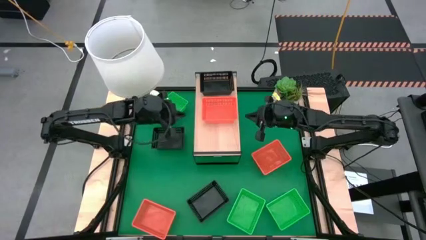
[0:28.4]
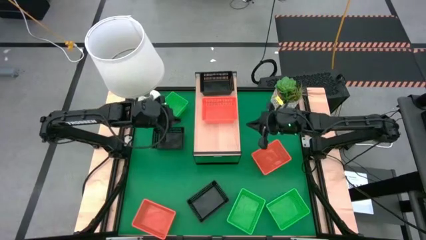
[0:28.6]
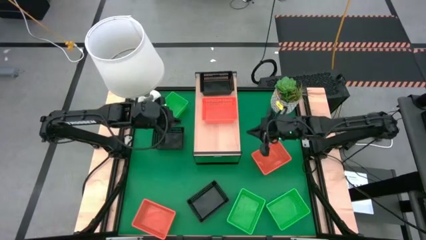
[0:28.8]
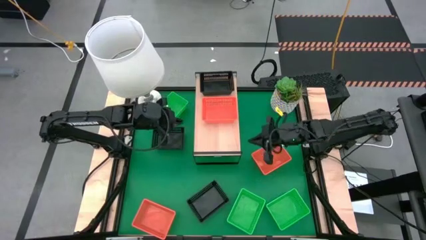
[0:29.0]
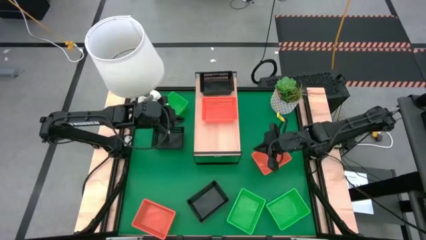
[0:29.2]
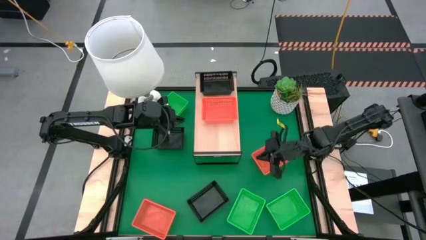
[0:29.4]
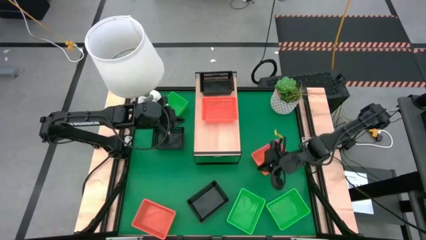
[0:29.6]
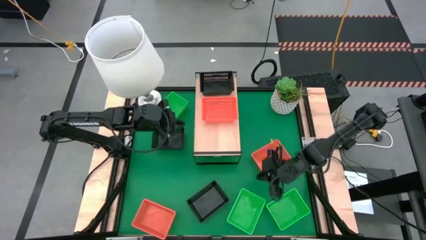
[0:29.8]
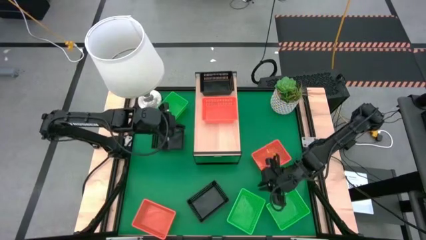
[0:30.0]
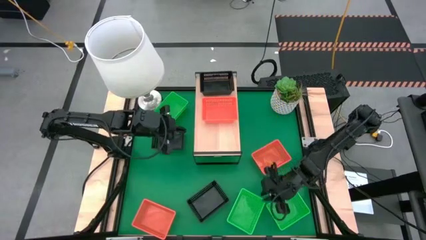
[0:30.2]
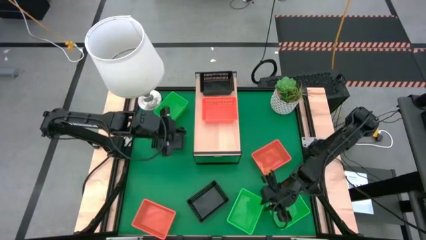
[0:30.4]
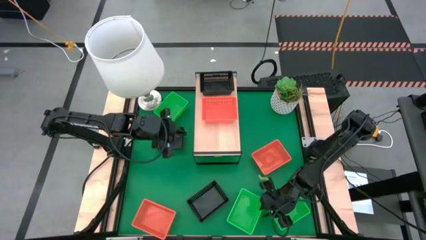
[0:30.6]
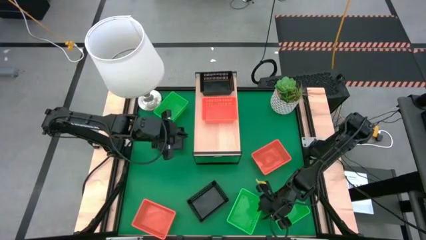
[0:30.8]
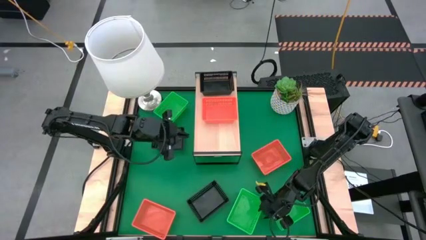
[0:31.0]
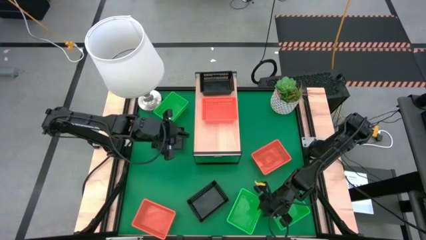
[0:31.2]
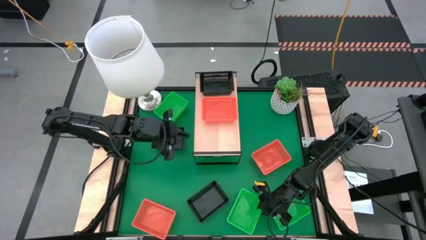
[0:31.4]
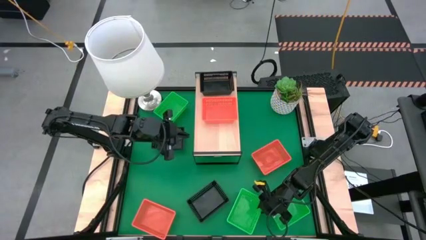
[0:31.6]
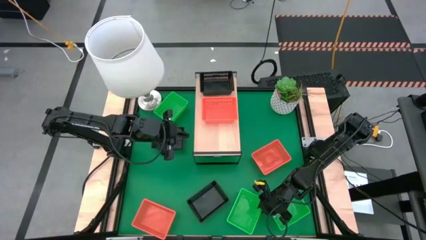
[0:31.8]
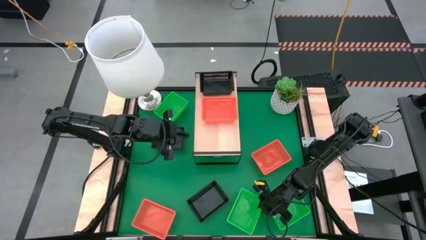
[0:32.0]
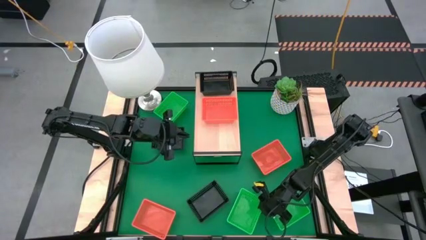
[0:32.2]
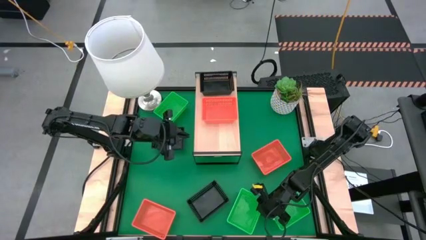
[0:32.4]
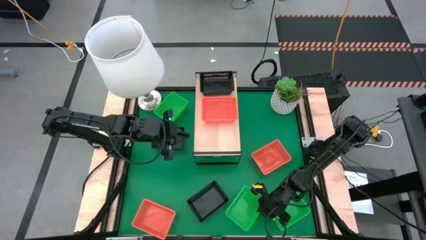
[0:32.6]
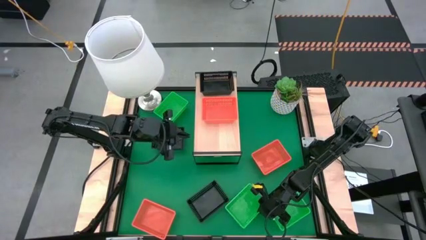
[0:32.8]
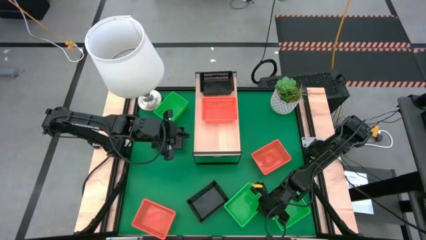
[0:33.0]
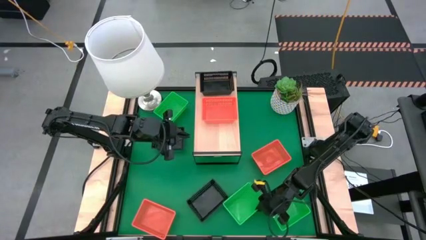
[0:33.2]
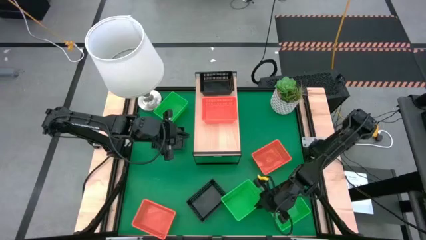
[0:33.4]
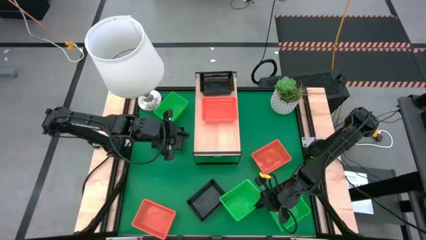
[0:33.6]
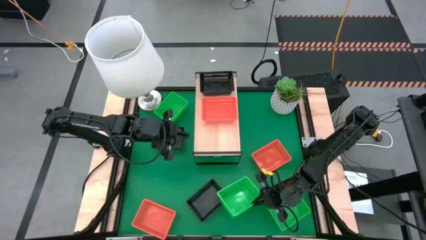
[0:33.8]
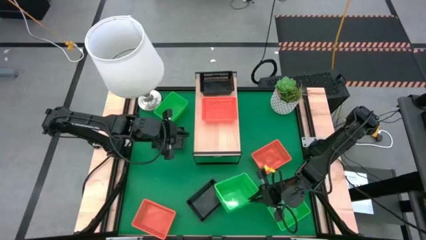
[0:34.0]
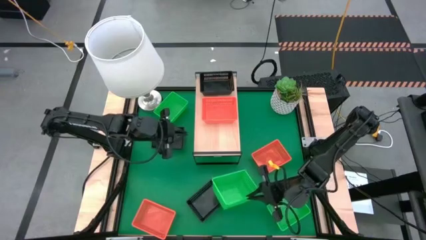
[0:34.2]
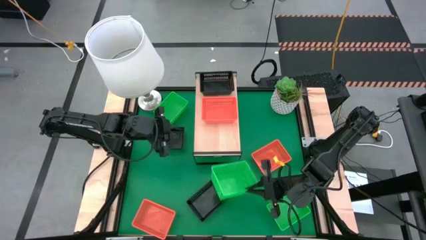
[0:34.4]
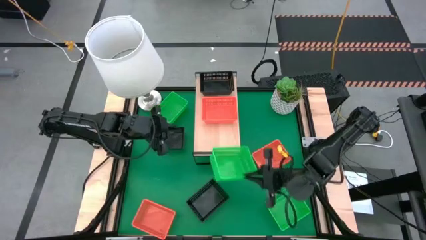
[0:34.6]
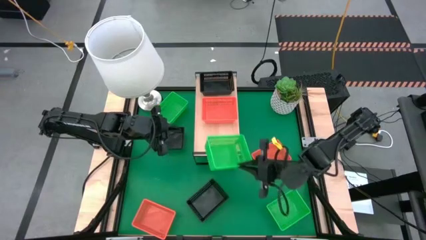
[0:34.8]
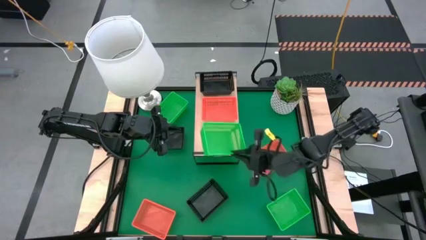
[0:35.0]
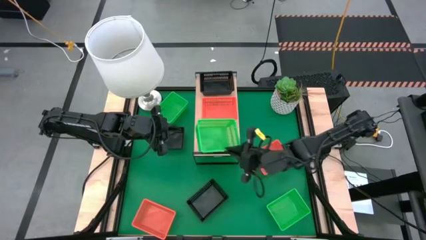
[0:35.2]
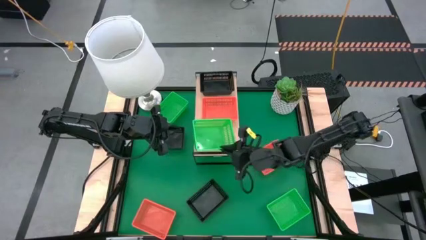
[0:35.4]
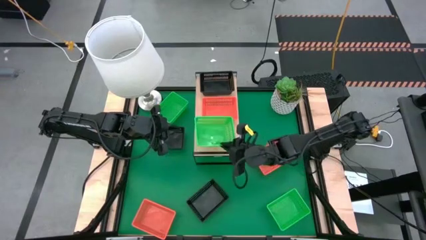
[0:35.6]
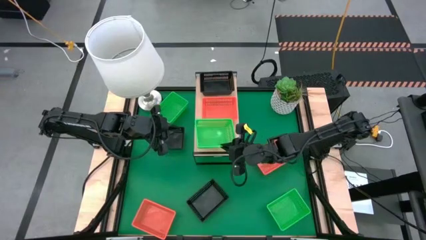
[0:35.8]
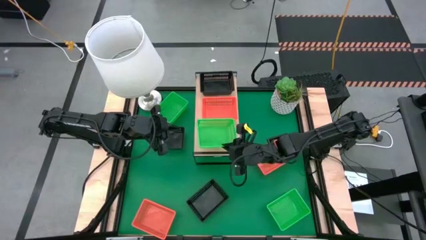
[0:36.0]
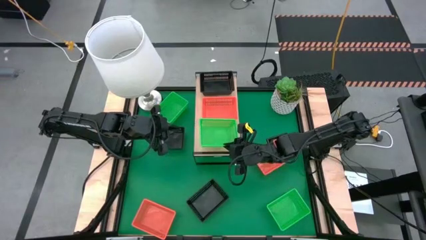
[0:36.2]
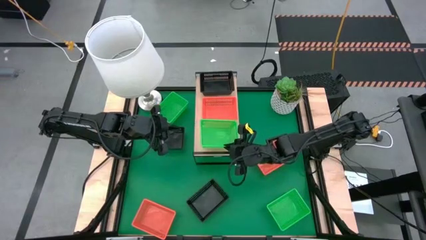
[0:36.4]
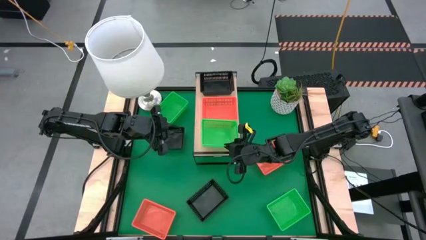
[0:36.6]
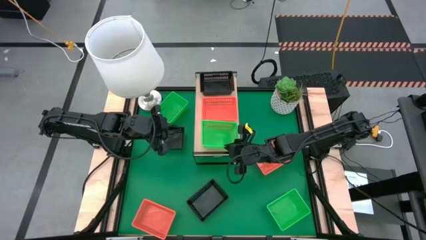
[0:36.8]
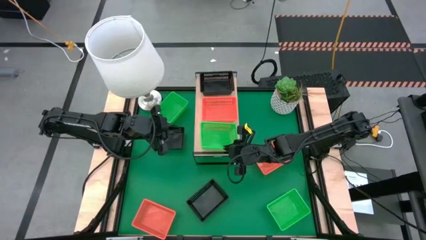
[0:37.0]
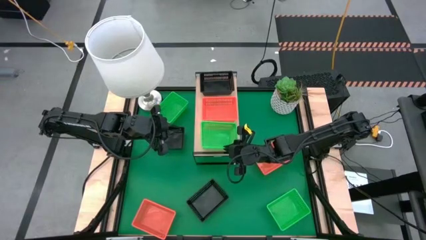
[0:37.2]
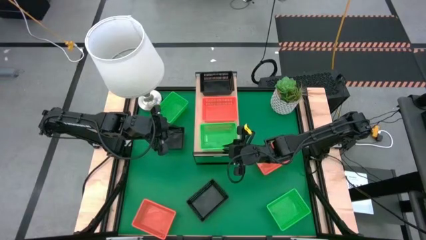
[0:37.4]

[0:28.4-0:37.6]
Task: Stack baskets on shelf by color
Put the bottom left green bin on the shelf

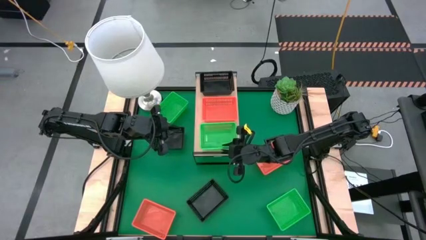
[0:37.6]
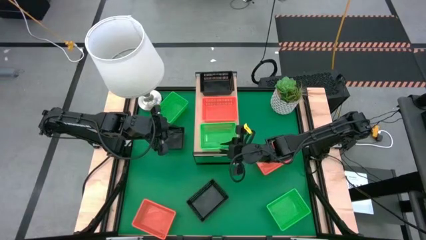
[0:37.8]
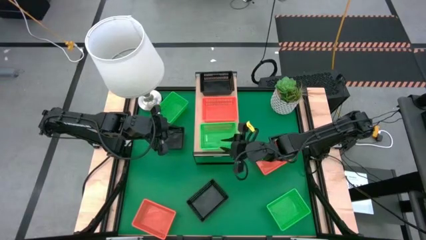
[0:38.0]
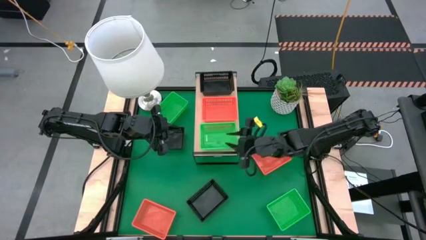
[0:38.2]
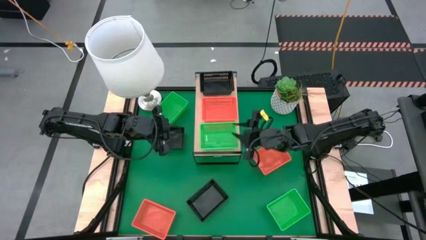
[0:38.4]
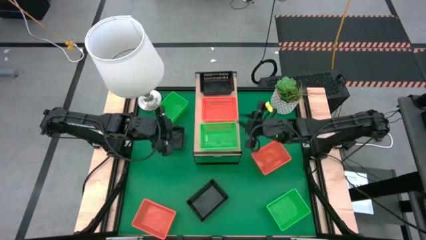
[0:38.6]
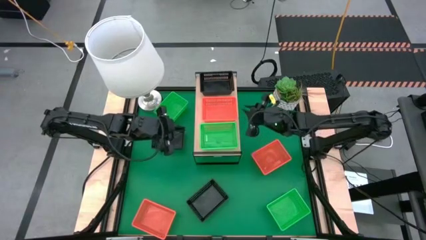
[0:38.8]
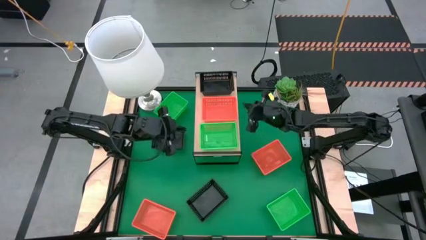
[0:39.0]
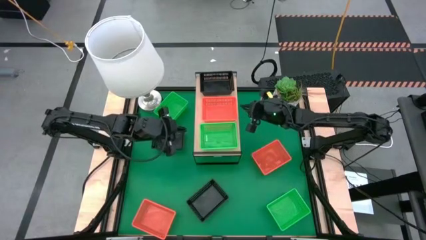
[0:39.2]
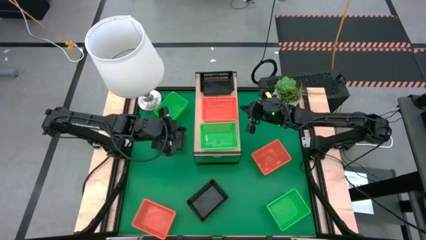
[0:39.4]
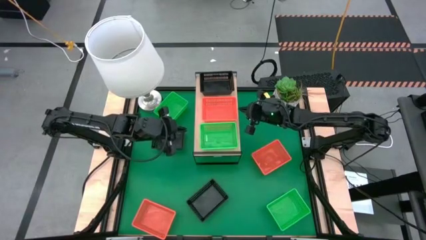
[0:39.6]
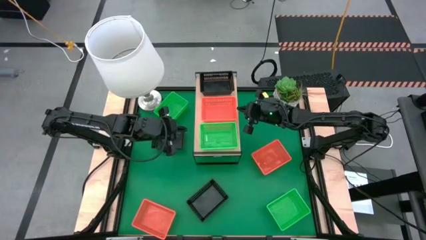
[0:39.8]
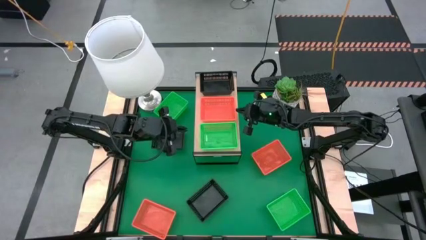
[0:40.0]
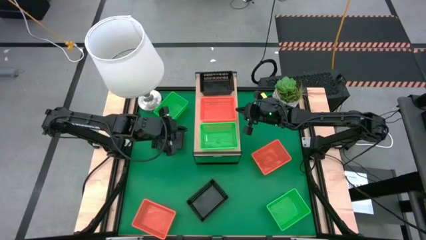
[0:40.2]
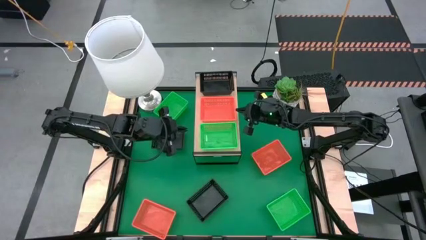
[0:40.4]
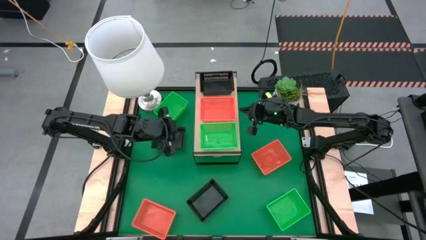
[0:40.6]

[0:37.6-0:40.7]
Adjust the orange bin on the shelf
